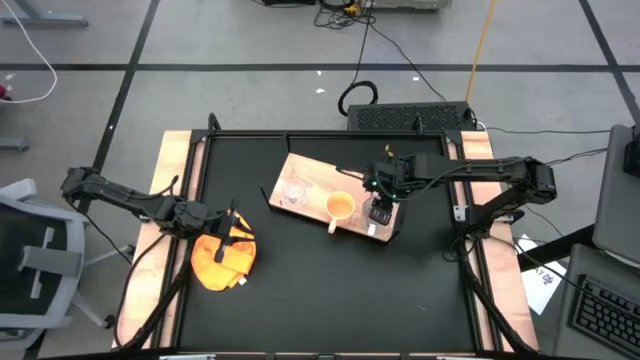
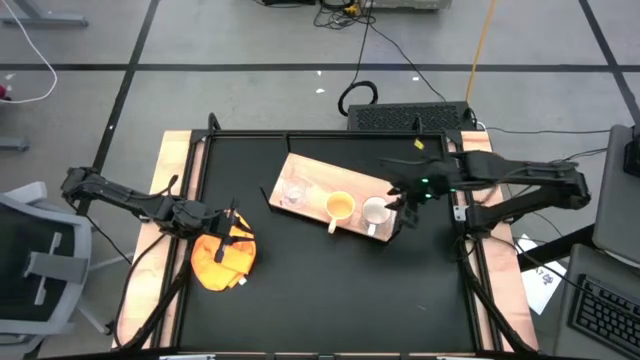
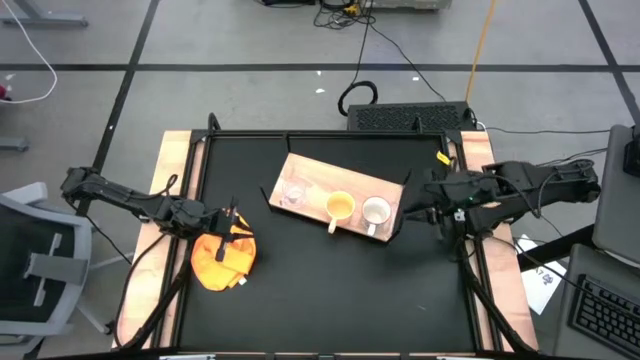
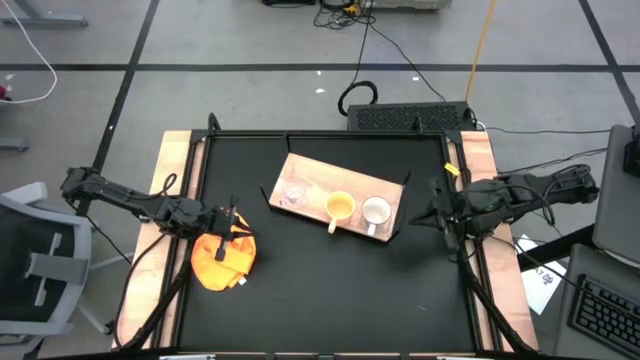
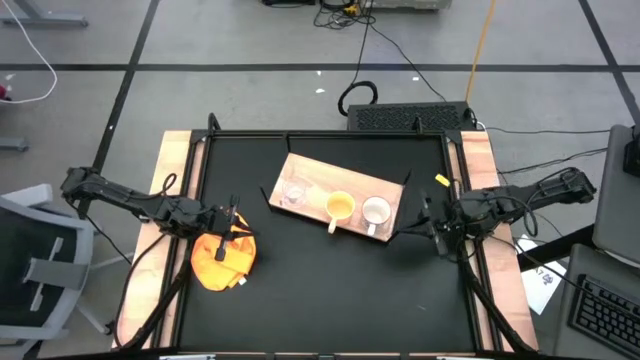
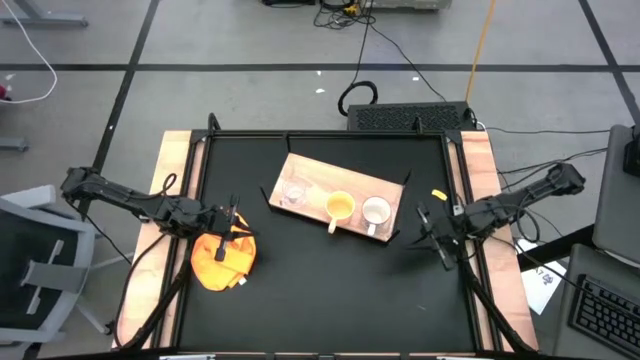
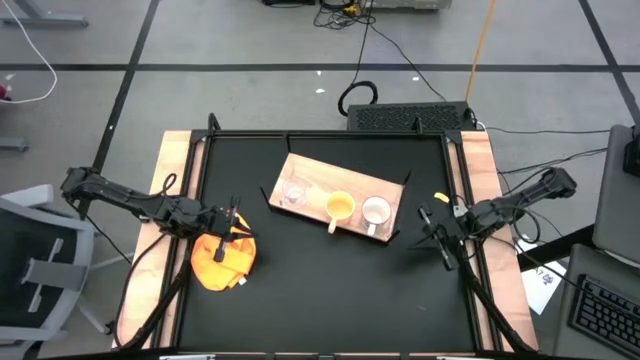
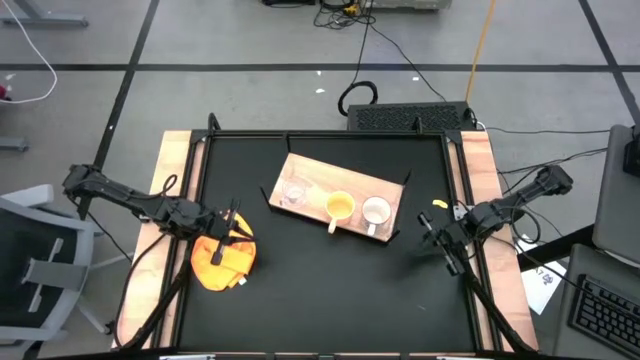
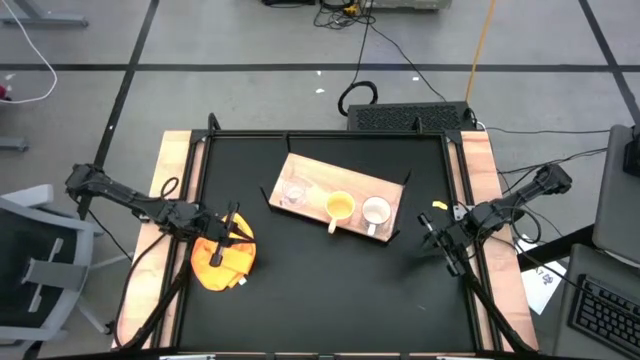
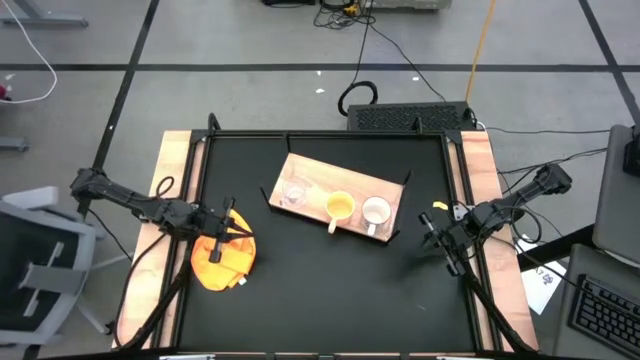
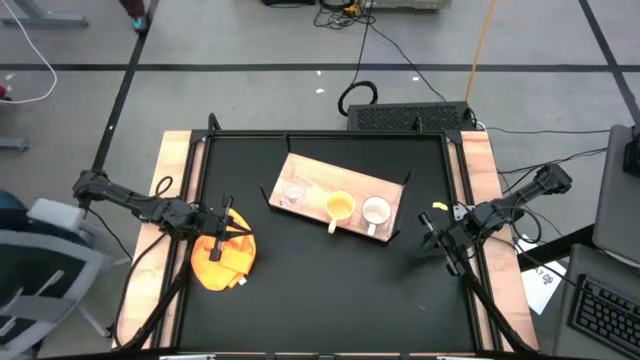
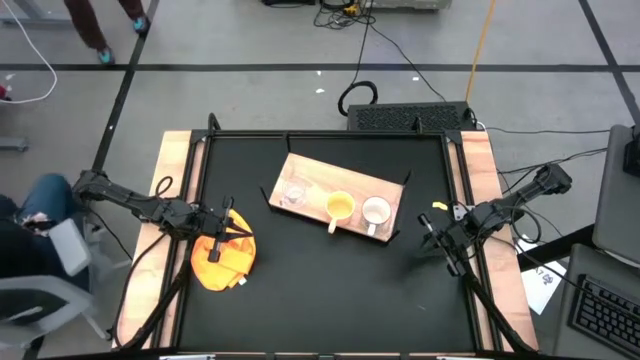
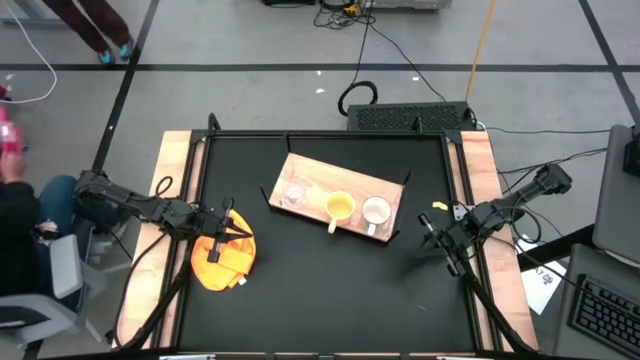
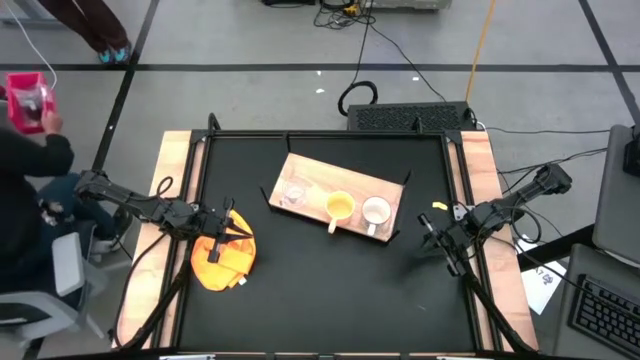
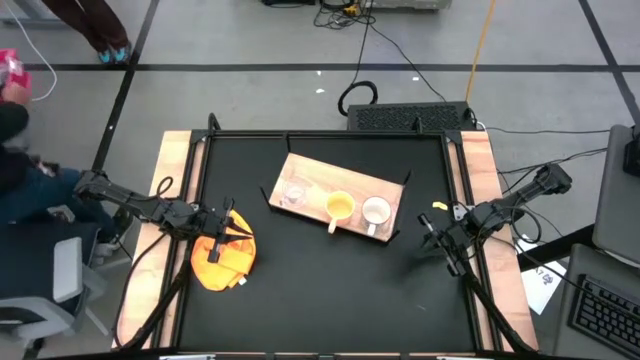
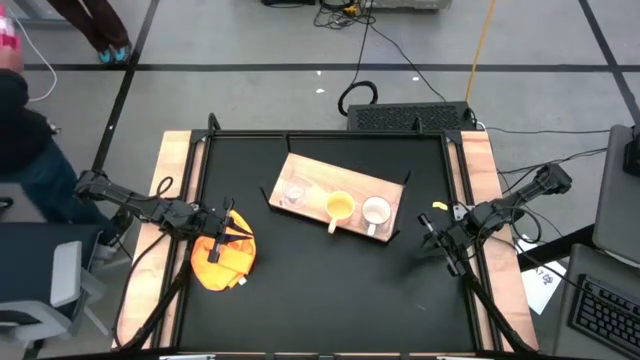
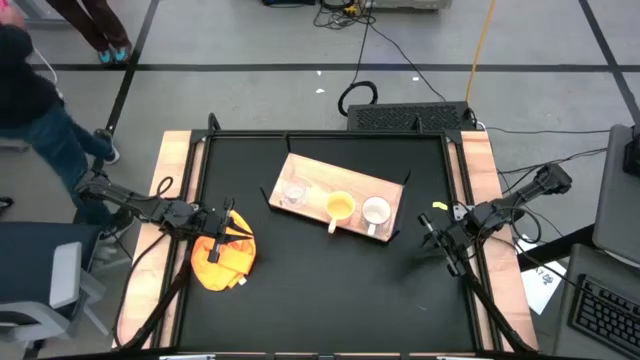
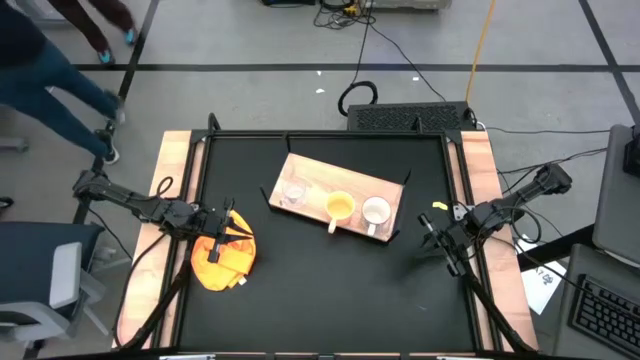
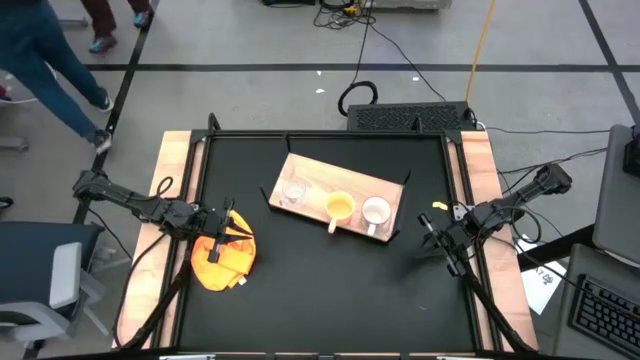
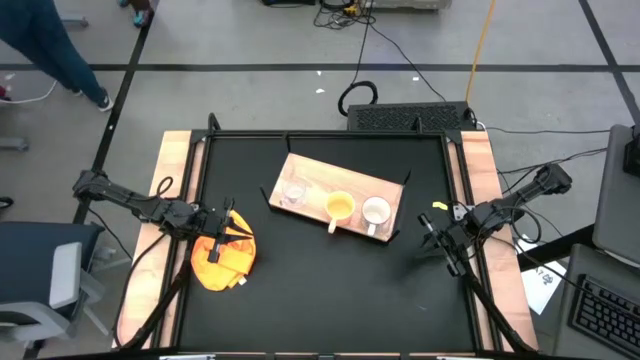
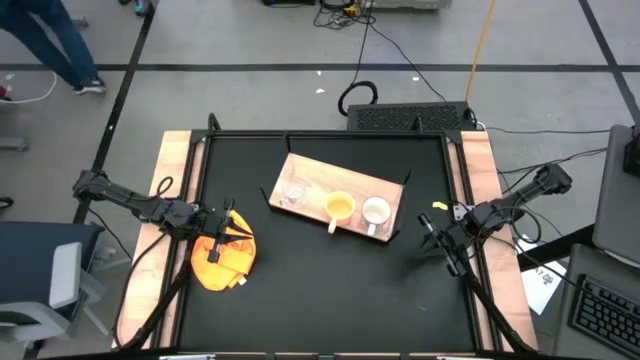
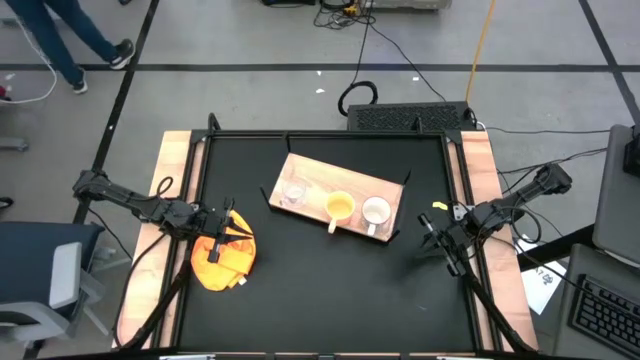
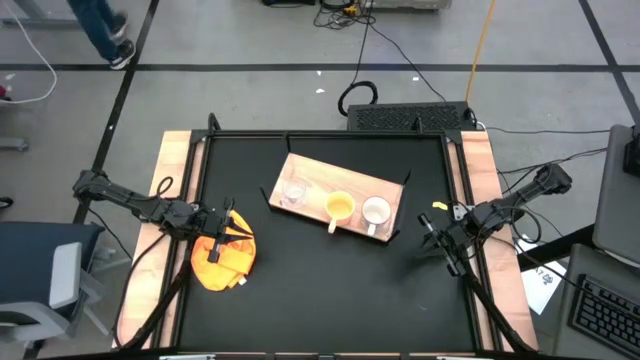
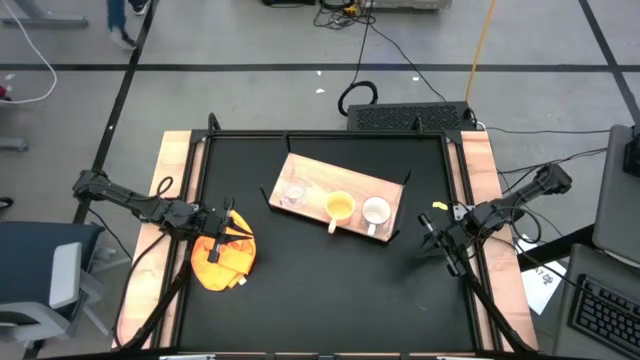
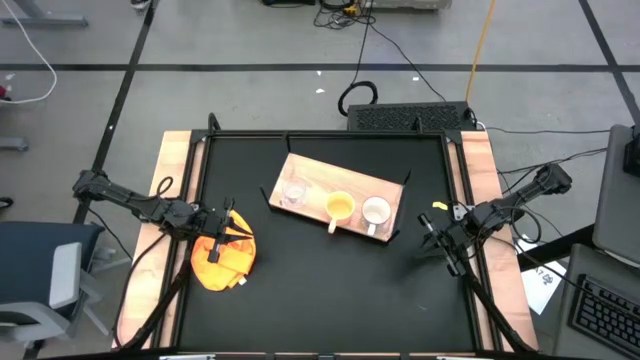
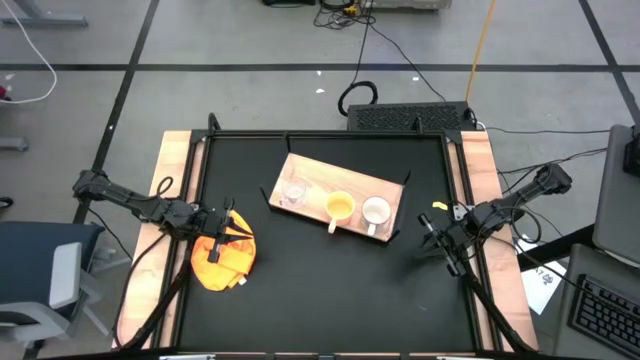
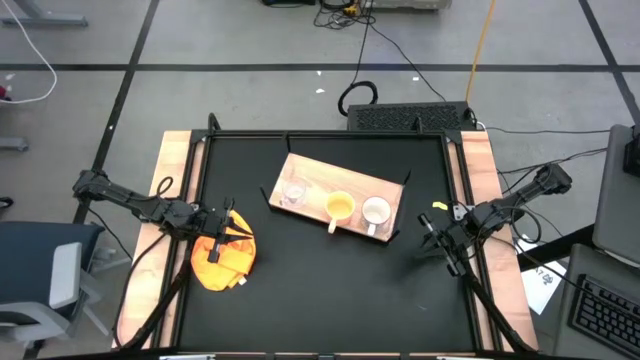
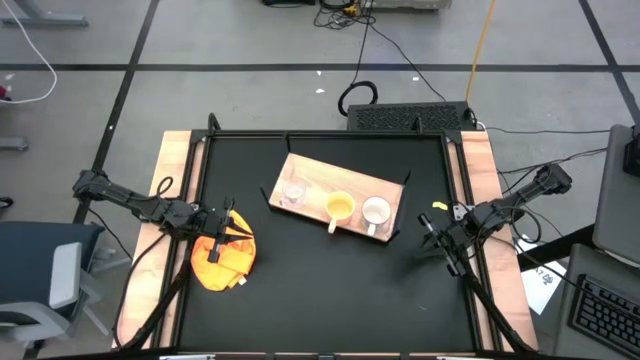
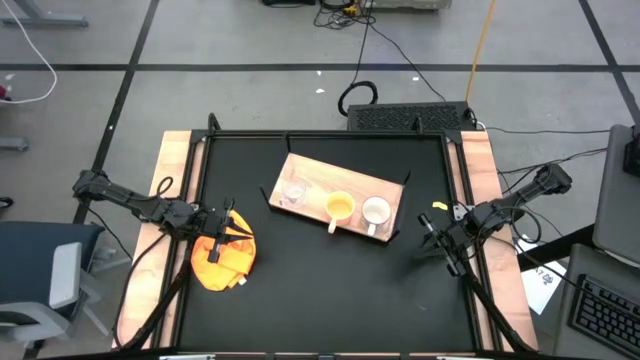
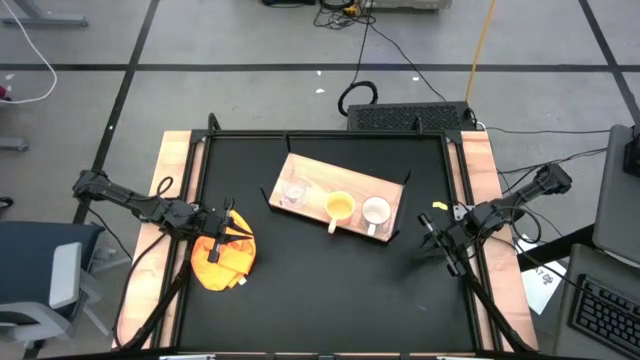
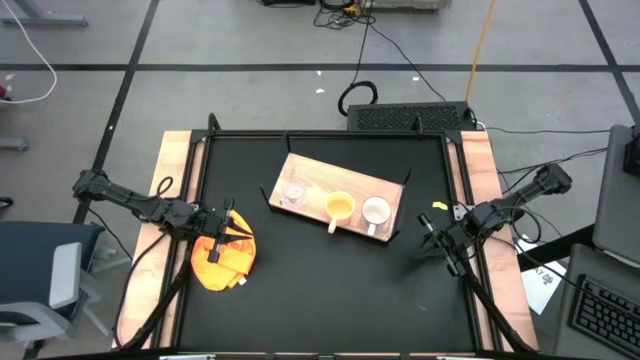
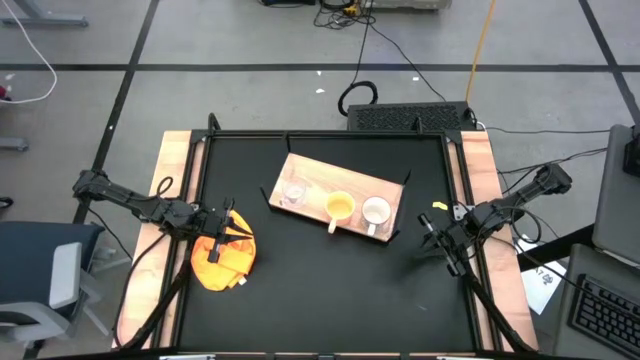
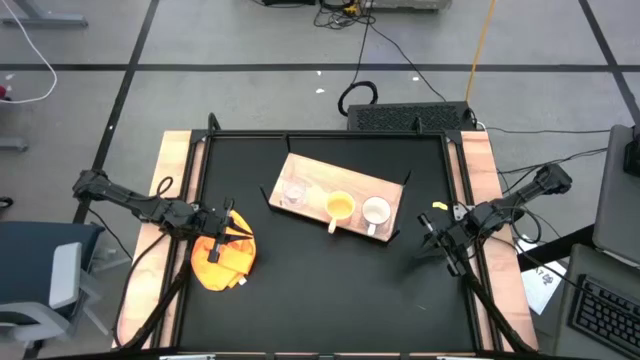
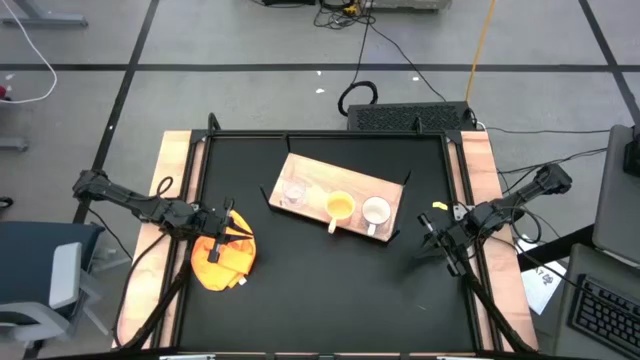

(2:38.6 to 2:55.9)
Task: Stack small to large cups/mugs on shelf
Return to Home Position
